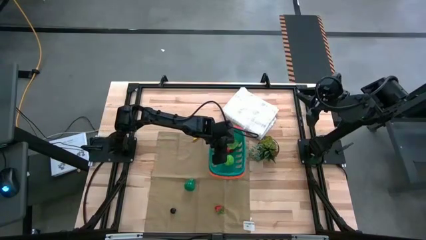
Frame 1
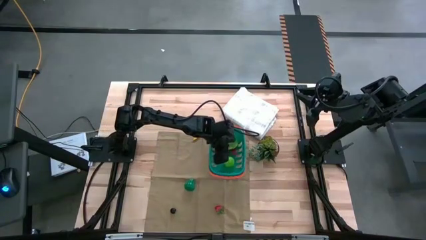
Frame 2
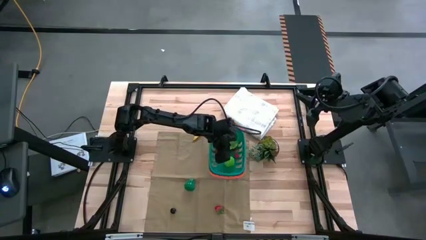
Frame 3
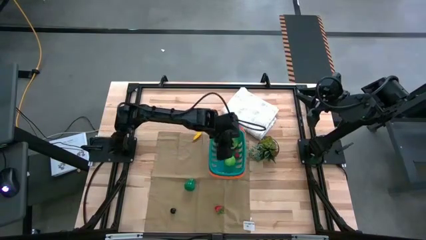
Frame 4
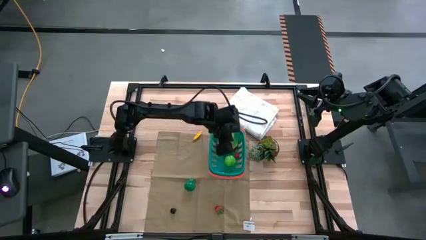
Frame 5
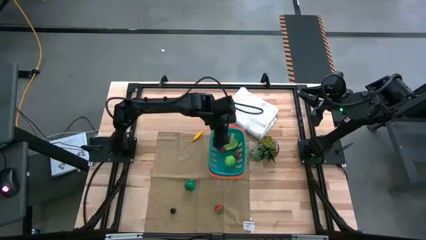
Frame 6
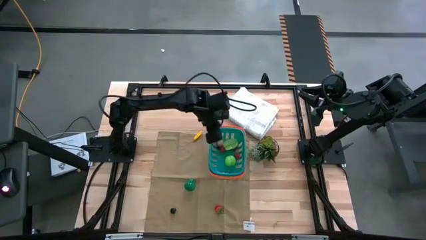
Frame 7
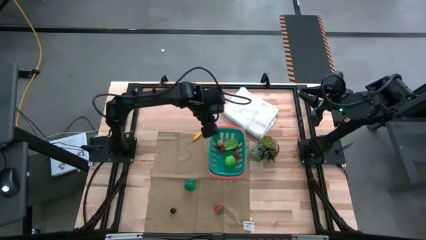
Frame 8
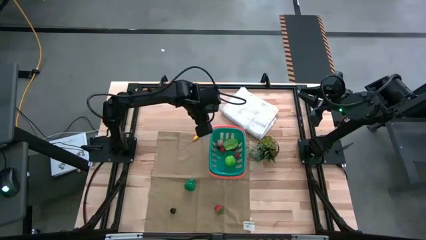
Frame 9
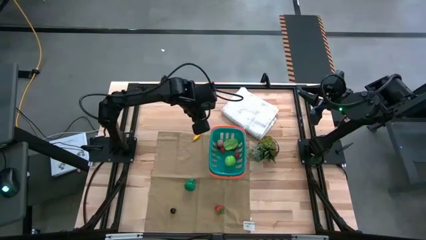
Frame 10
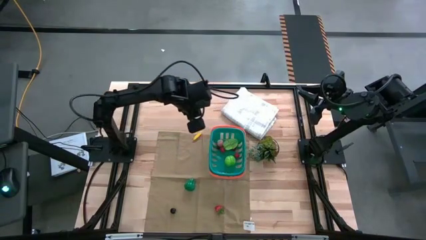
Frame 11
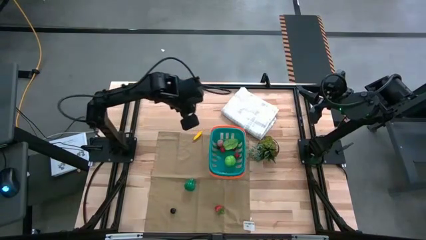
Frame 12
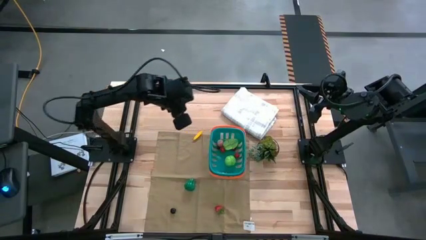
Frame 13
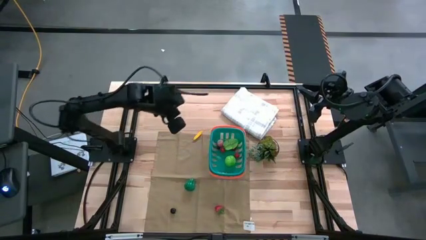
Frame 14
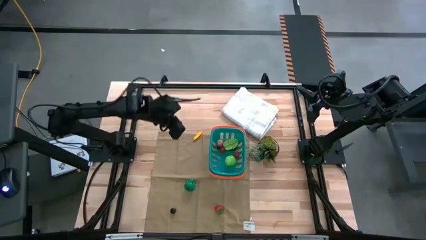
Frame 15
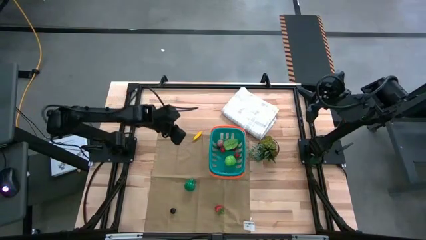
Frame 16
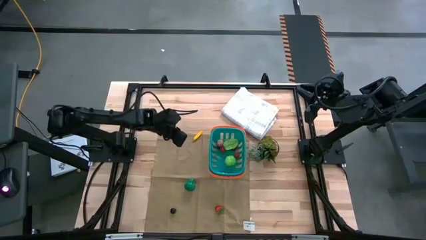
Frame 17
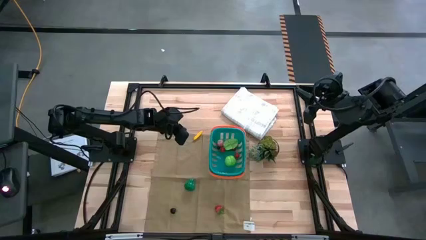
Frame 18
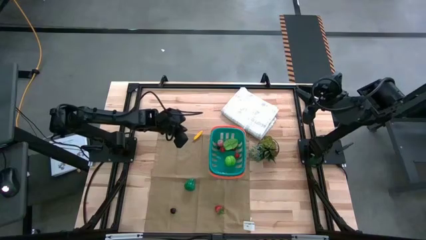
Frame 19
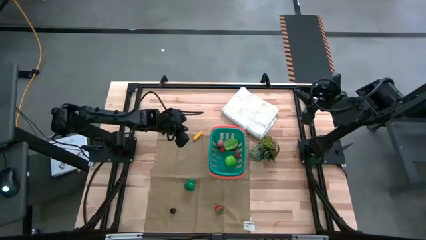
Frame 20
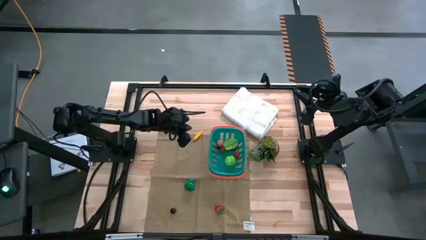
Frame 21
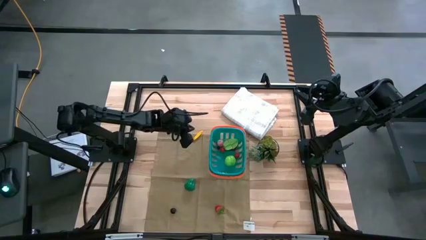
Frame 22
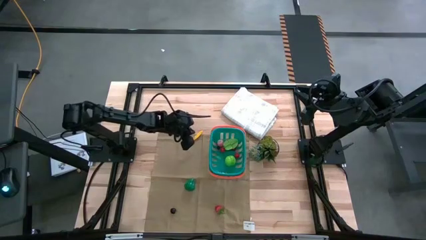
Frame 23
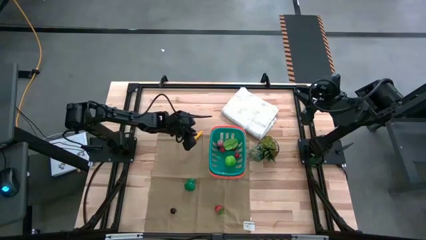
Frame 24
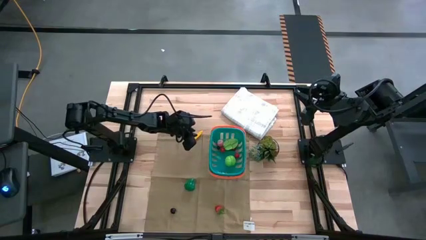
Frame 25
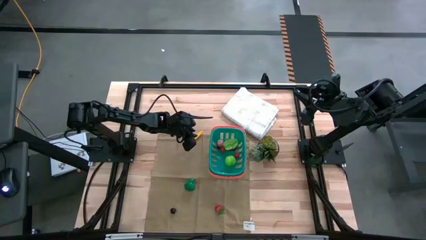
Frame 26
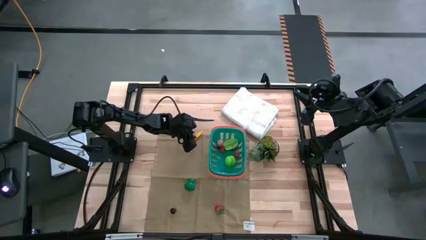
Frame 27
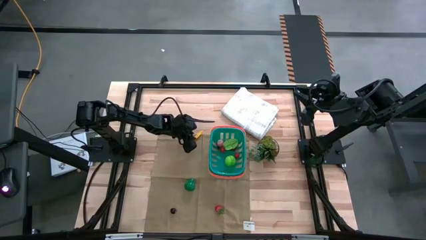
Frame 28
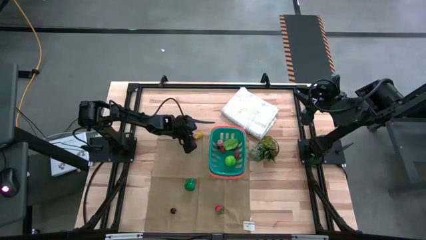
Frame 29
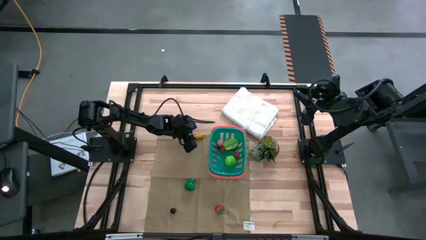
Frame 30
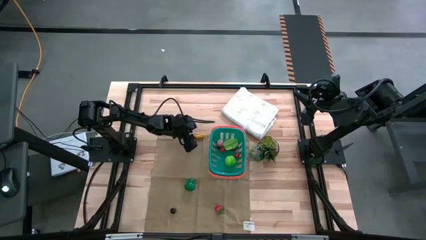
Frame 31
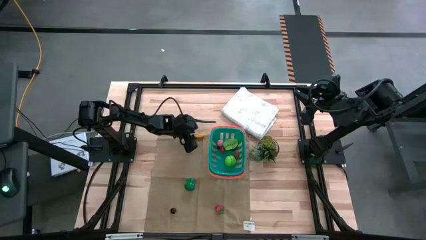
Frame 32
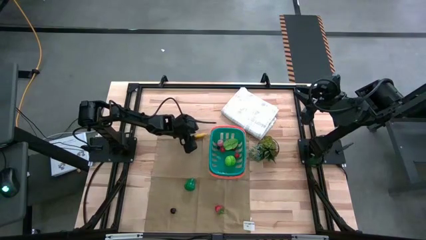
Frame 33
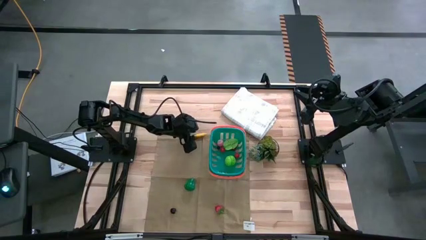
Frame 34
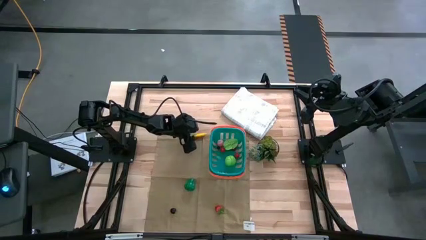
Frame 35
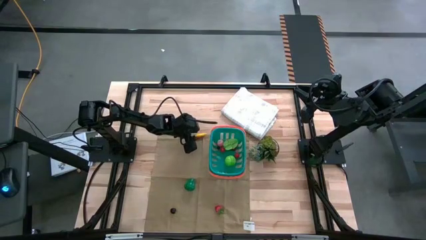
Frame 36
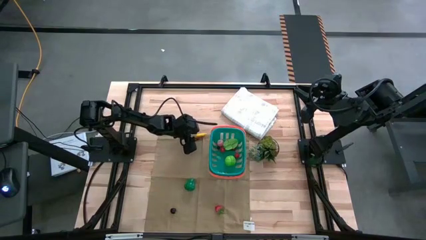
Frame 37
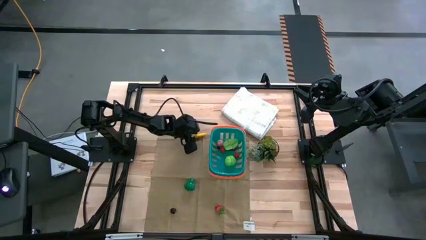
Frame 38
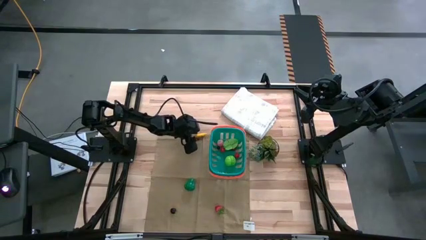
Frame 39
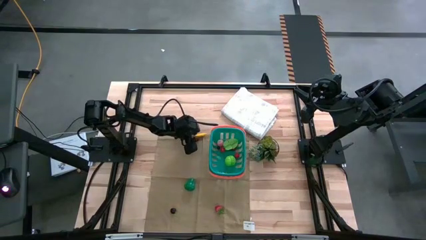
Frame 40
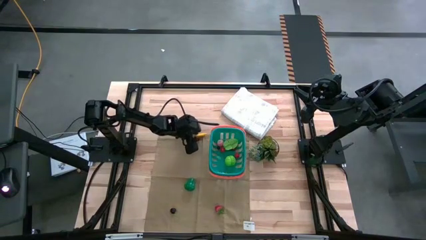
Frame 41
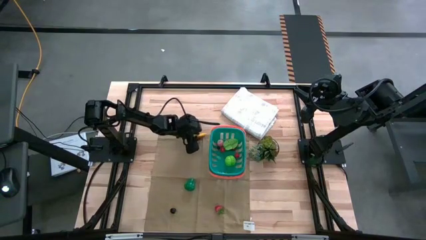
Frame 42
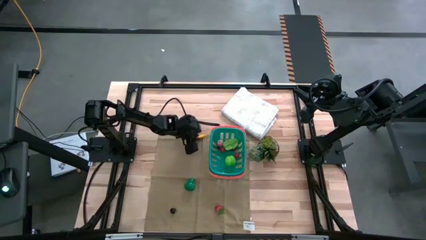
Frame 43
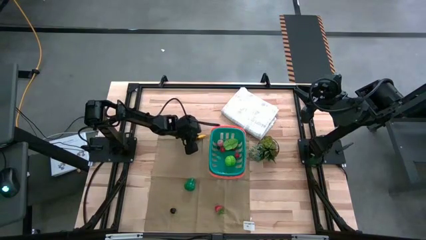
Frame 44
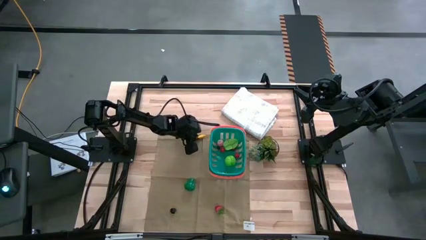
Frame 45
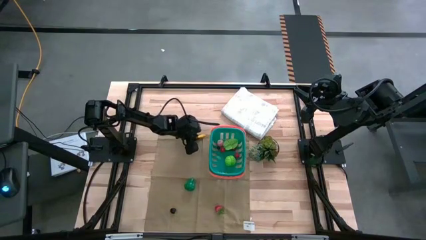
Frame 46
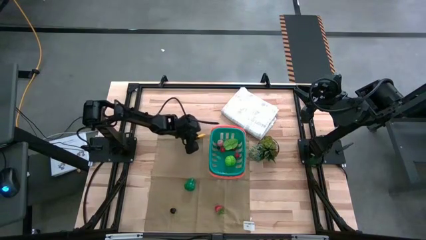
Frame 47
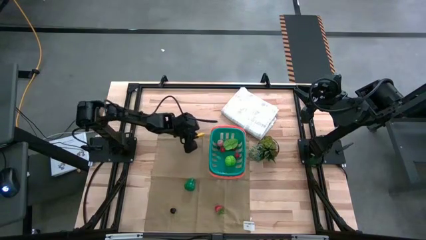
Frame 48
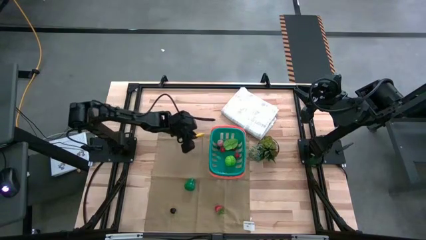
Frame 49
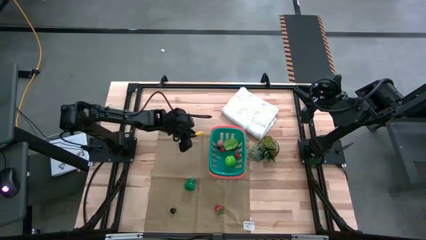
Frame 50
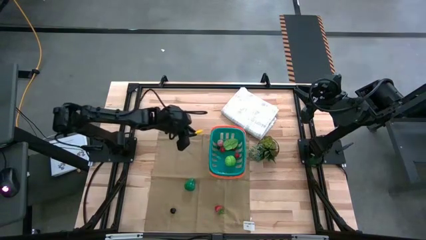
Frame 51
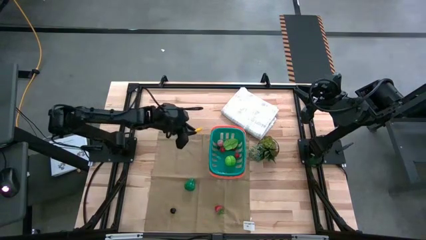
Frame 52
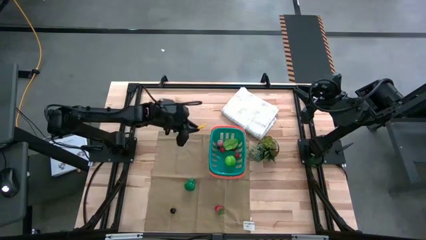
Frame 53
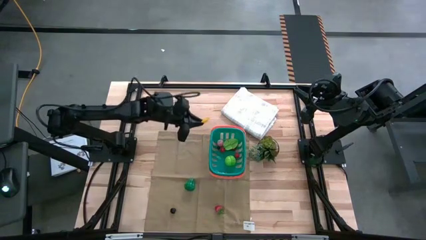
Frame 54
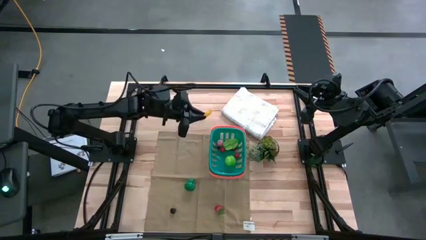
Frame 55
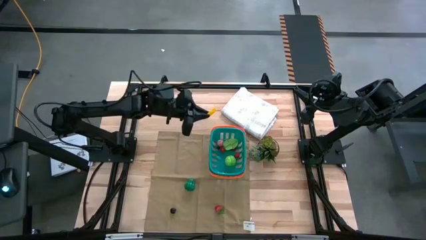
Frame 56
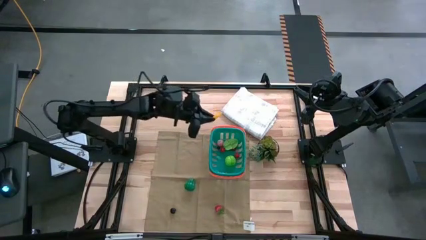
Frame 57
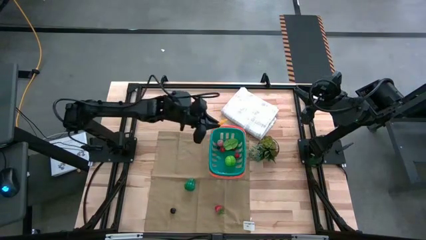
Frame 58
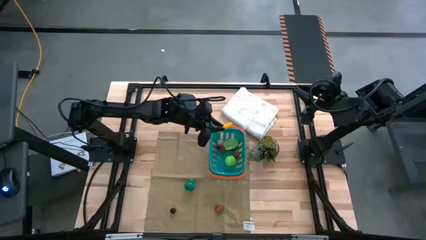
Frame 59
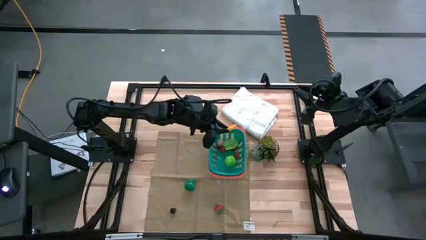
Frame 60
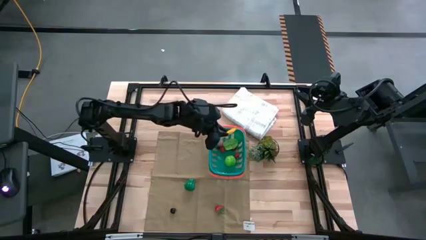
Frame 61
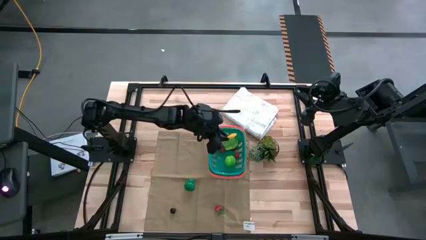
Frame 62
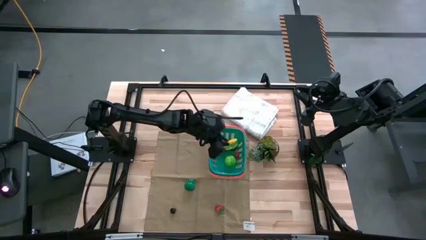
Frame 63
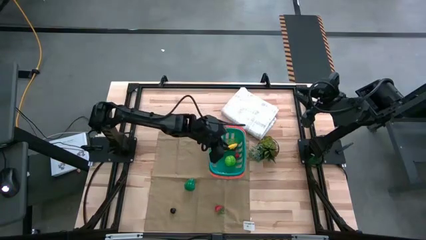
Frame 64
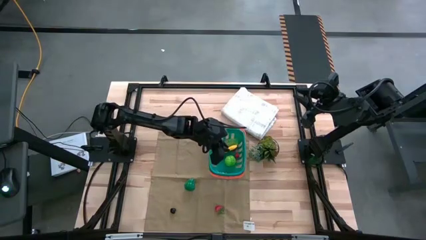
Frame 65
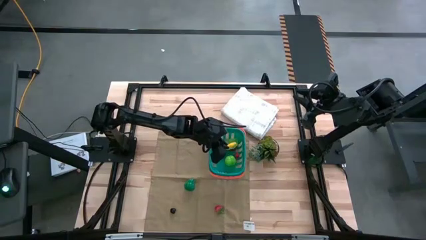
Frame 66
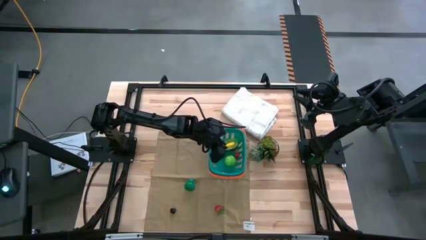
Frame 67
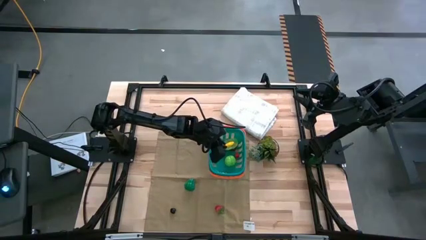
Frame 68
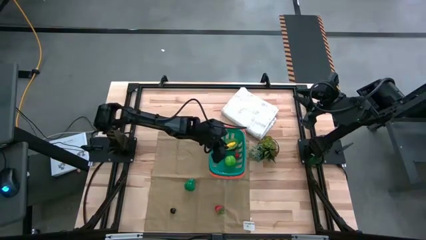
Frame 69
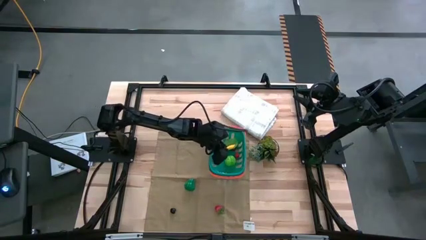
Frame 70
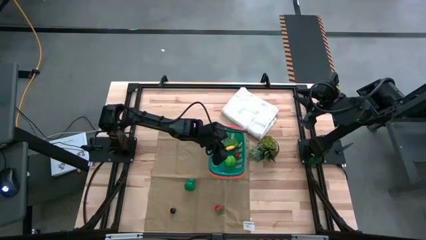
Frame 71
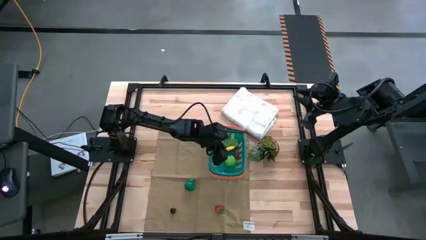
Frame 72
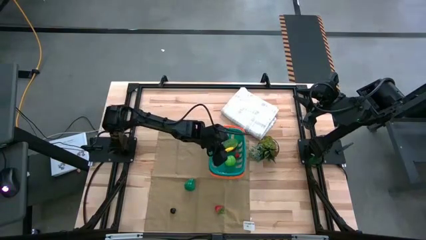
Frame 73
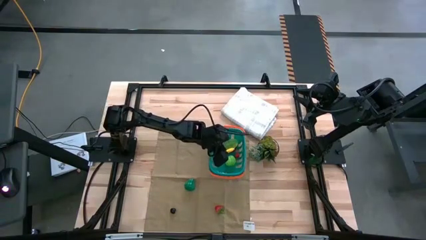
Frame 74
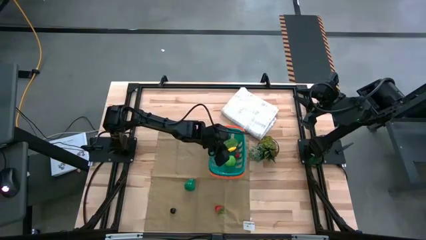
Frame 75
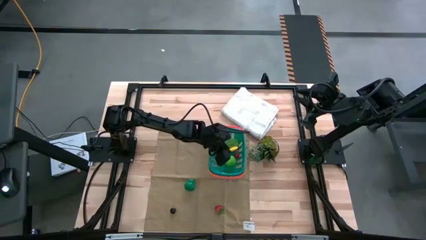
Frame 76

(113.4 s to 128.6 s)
Task: Pick and placing Produce into tupperware
Put the yellow corn into the blue basket
